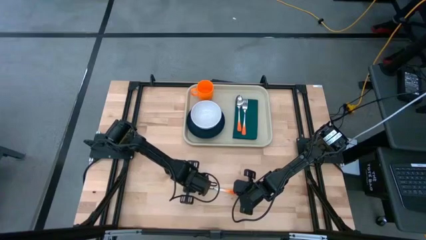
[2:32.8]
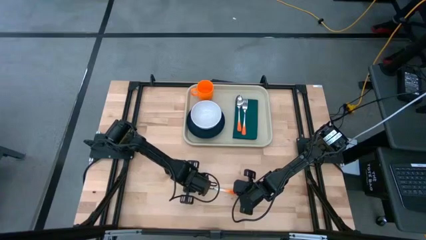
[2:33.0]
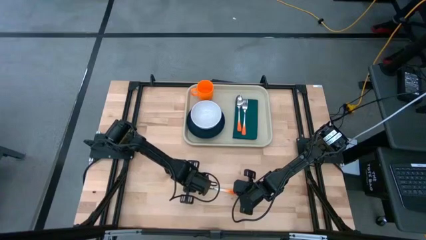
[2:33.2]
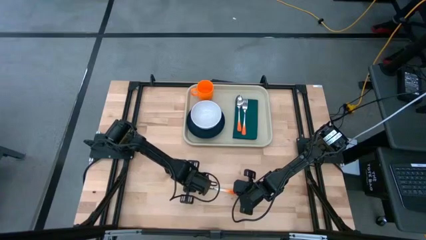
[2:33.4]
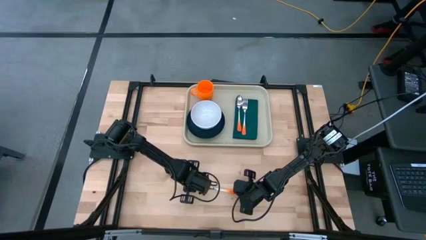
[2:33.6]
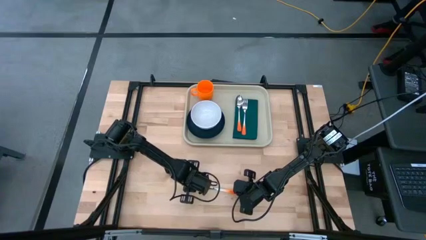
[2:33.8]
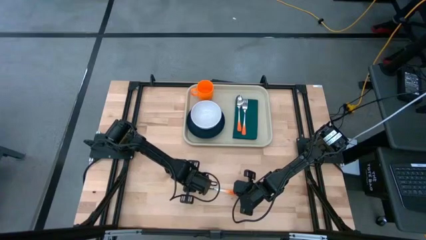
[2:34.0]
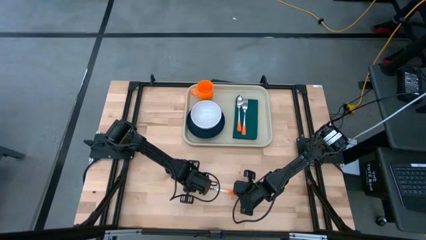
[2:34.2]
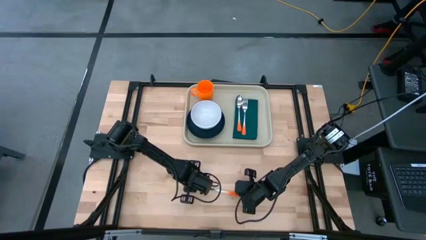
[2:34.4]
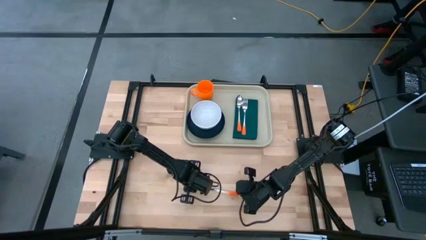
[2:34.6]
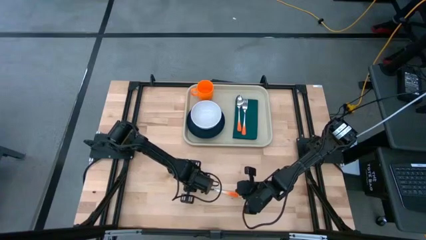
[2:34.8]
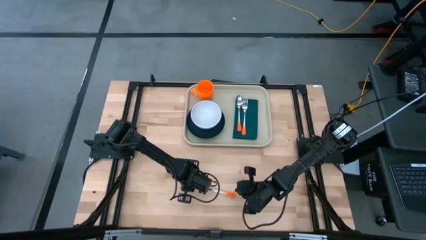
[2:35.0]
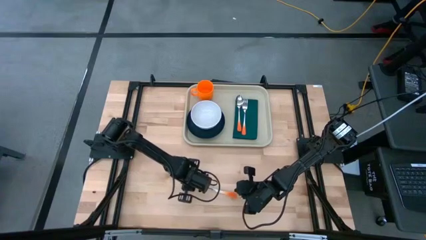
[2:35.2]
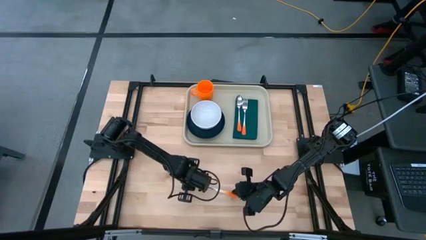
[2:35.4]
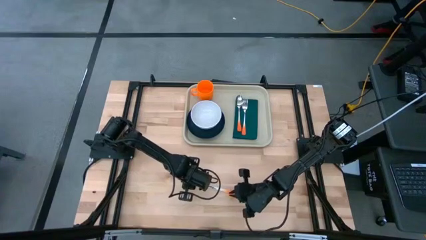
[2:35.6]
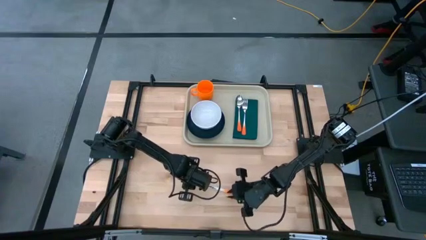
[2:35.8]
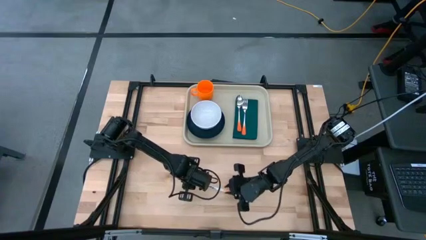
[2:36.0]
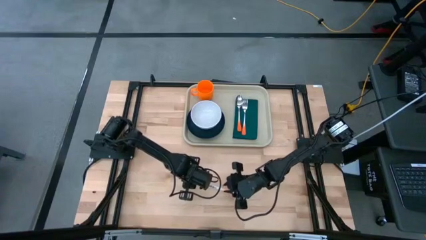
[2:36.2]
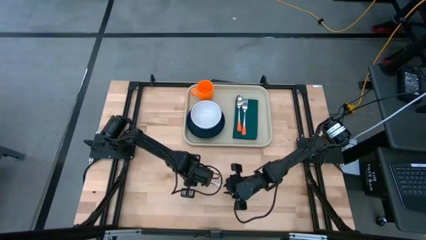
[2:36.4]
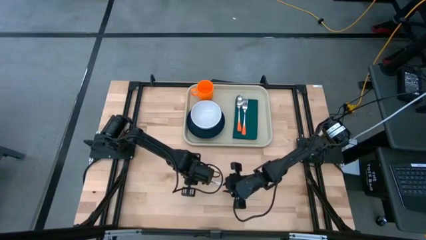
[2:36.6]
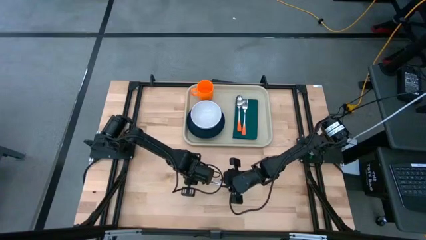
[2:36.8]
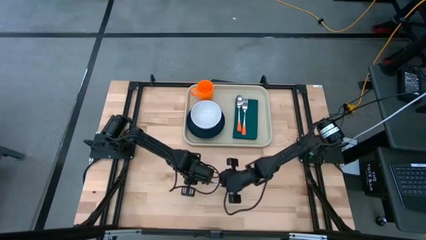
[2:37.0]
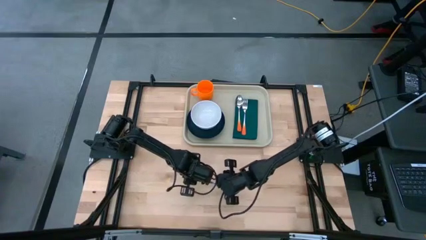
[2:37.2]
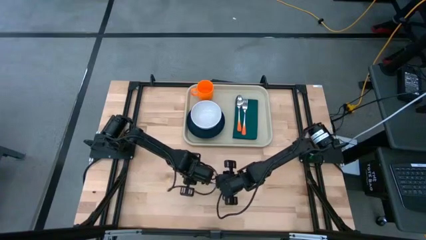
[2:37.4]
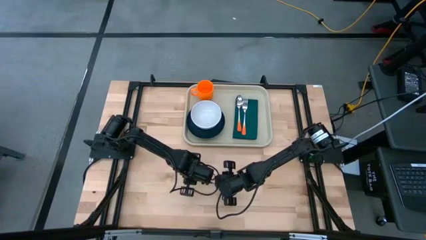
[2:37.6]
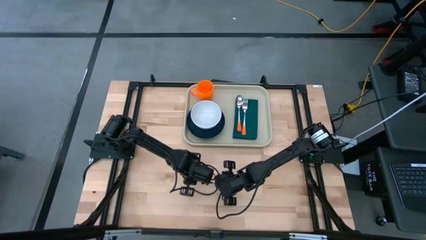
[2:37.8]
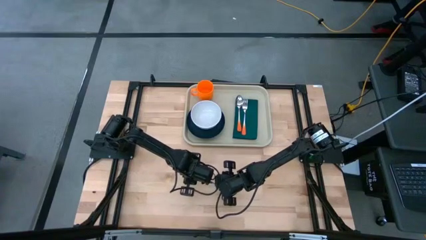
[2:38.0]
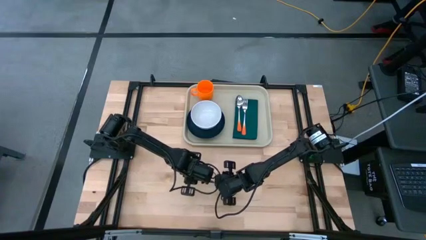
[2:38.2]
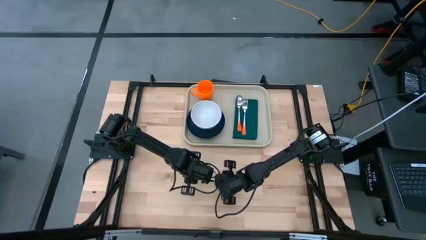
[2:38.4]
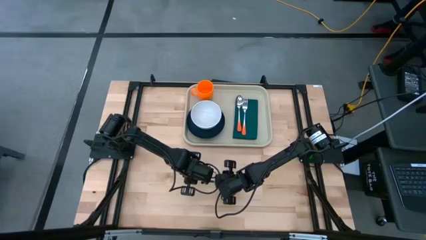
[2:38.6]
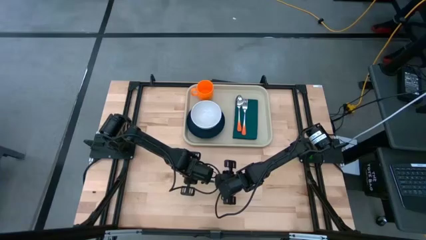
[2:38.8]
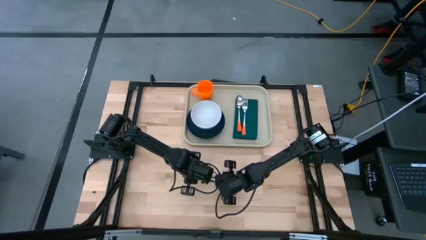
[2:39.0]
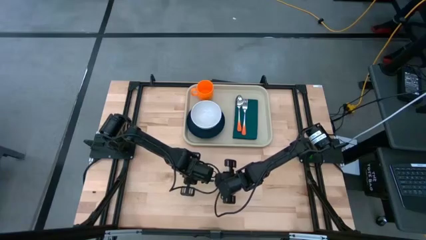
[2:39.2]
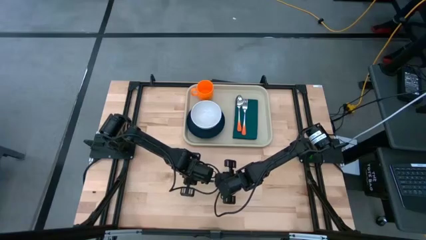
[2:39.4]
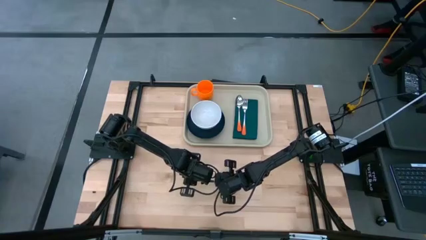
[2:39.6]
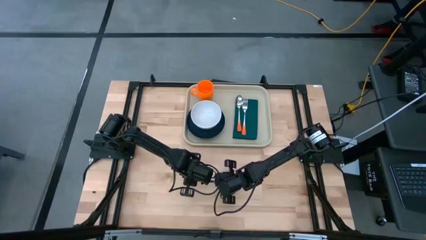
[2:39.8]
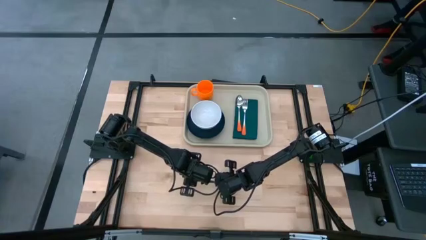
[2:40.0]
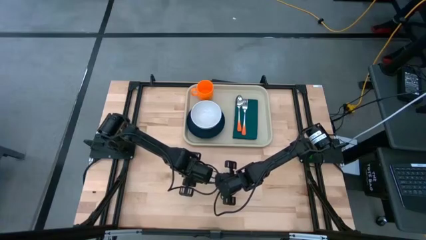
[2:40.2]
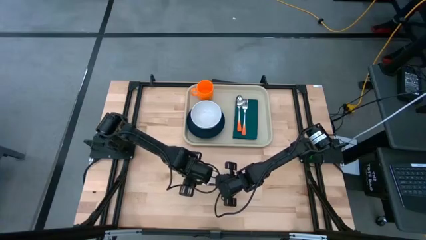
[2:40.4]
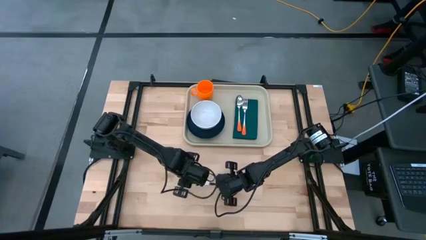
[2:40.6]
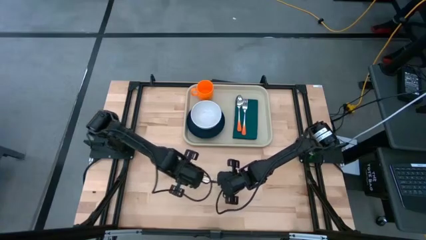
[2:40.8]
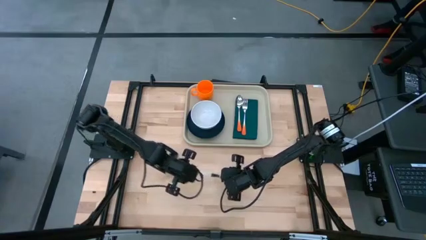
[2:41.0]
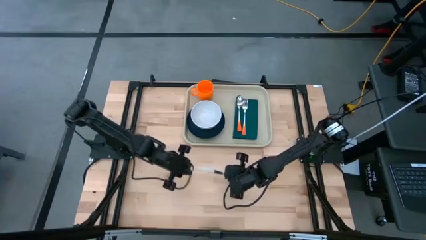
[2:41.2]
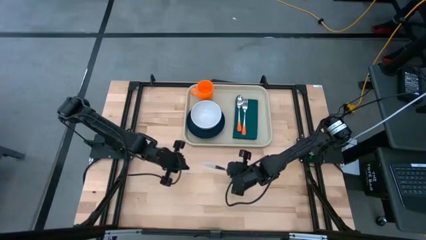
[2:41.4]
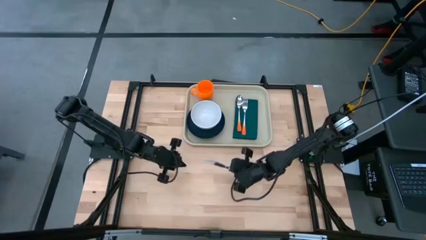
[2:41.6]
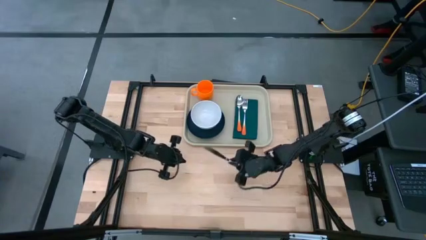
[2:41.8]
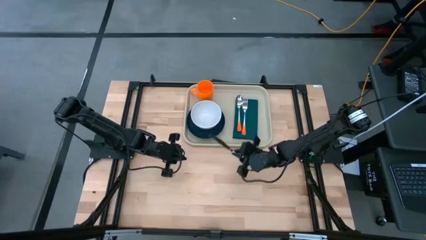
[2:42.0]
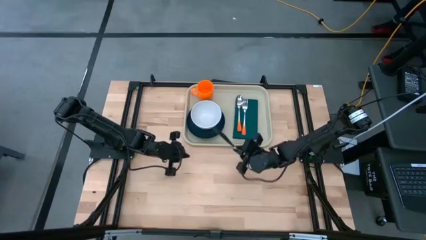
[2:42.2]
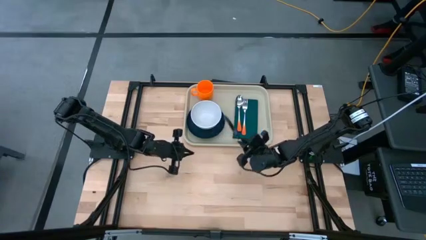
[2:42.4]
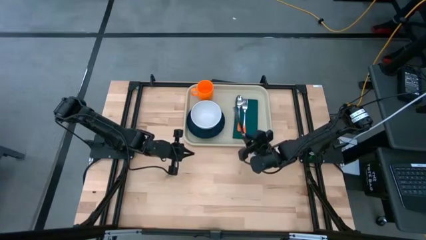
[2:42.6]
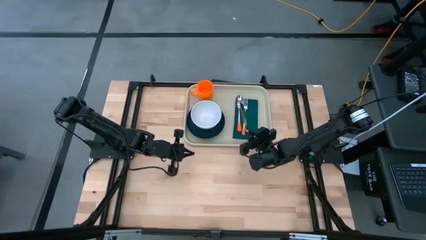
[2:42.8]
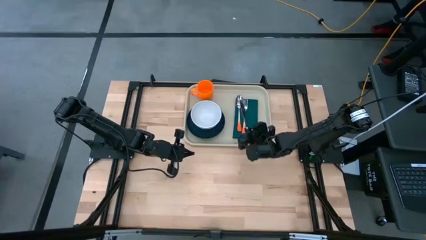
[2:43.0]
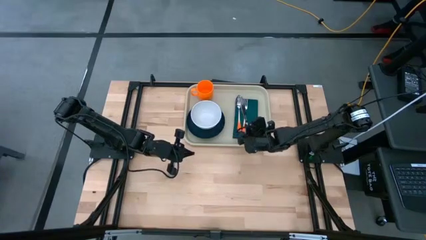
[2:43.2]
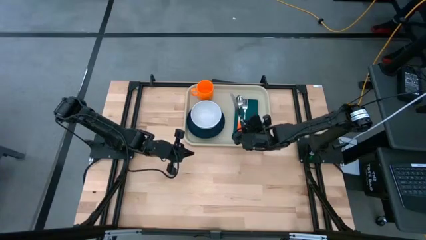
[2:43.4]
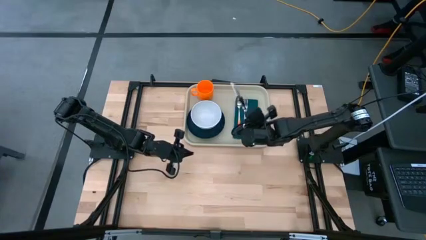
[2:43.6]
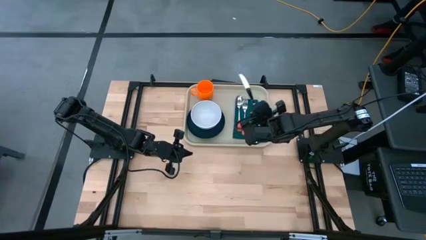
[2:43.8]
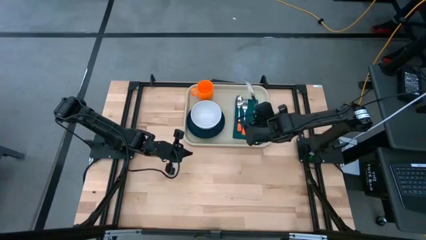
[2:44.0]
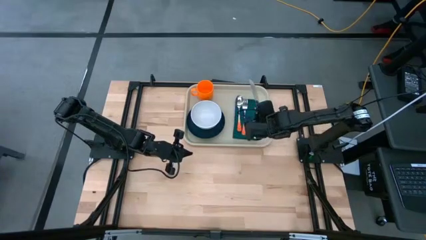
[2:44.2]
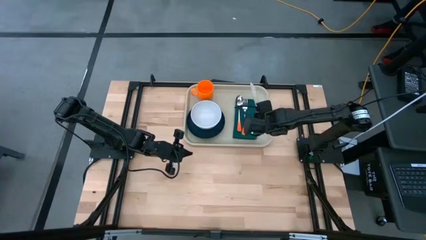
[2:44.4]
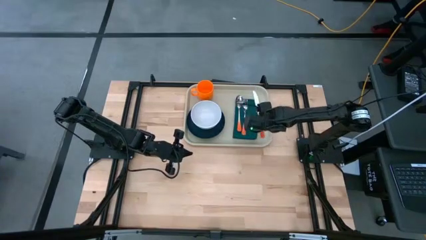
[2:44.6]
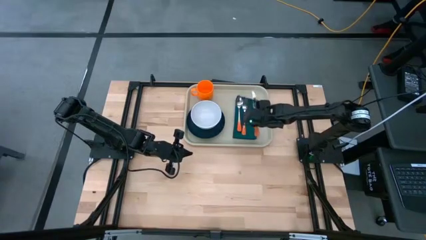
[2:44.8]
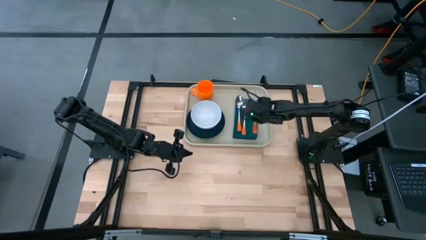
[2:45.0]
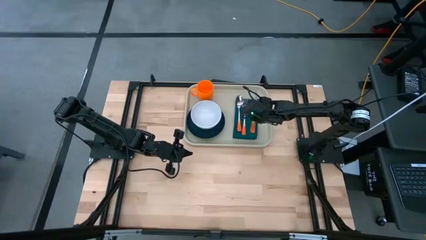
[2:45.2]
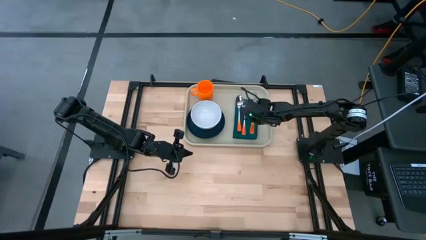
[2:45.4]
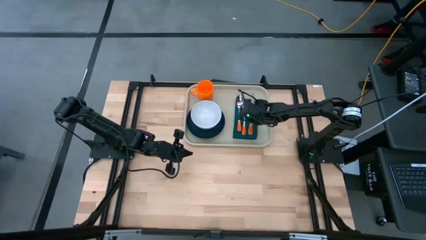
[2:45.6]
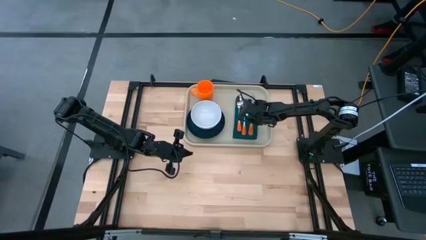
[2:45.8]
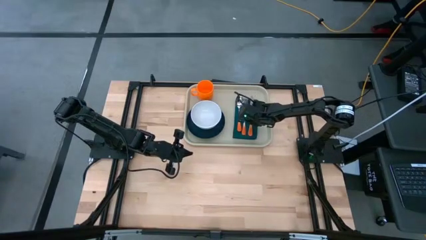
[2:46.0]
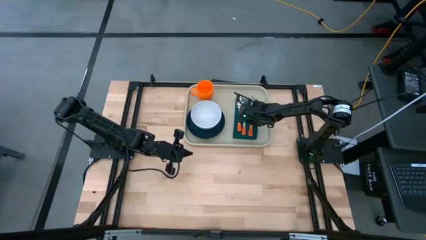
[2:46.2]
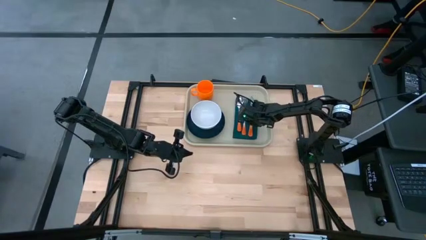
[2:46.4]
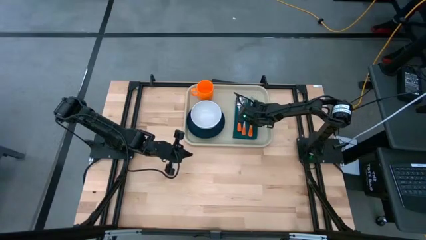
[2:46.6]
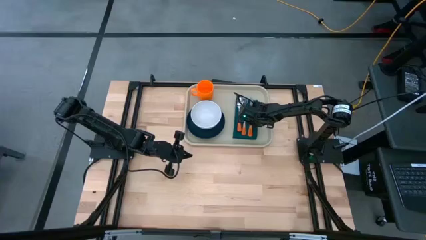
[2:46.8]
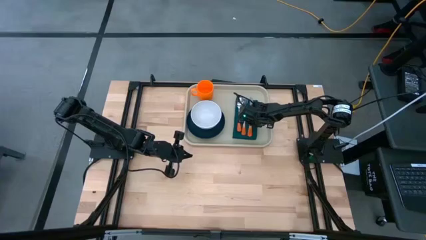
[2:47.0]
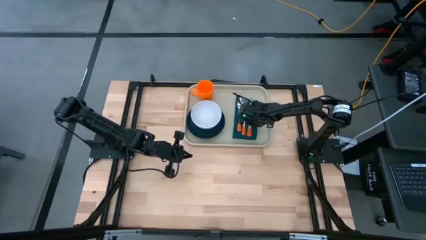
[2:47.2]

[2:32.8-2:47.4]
Task: Set up tray
Put the orange knife on top of the green napkin to the right of the orange fork on the gray serving tray
